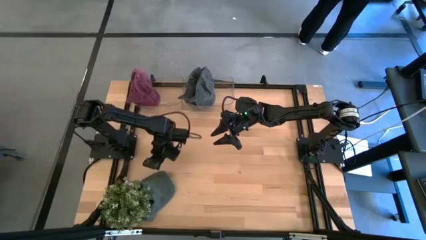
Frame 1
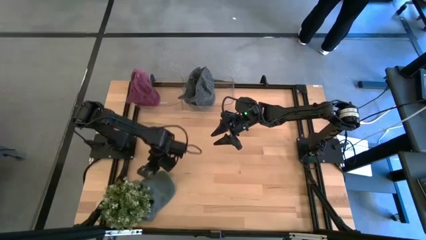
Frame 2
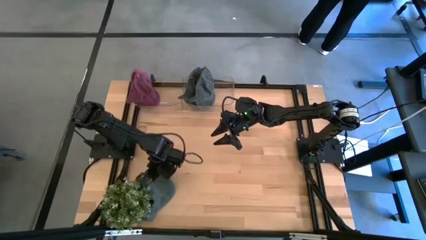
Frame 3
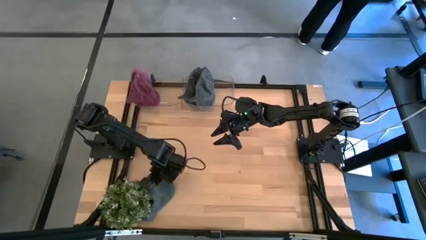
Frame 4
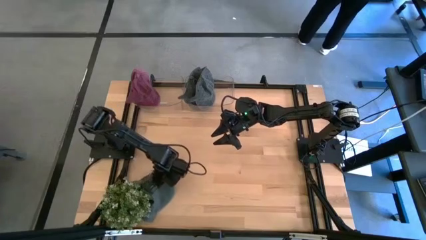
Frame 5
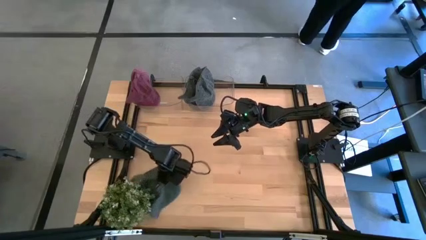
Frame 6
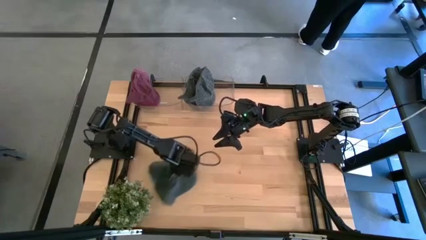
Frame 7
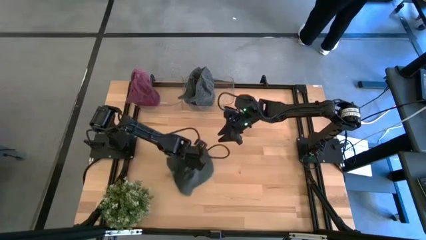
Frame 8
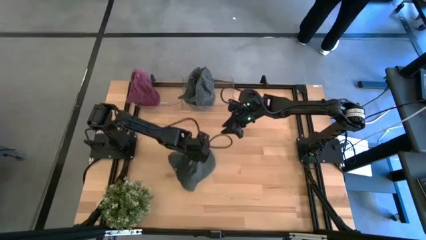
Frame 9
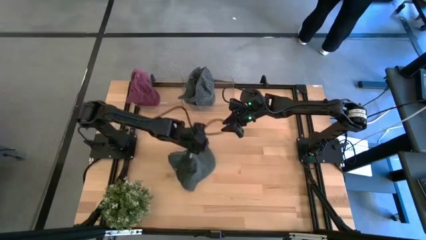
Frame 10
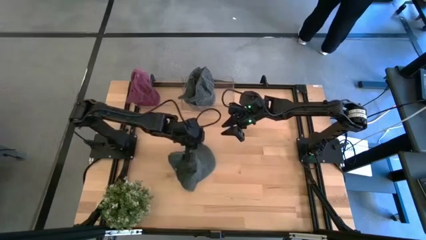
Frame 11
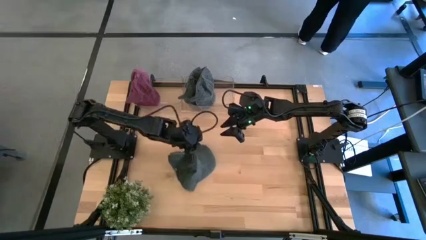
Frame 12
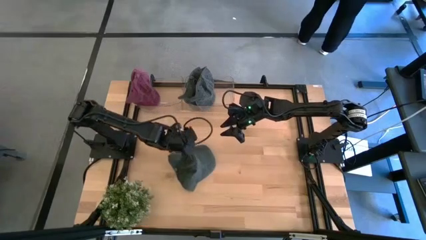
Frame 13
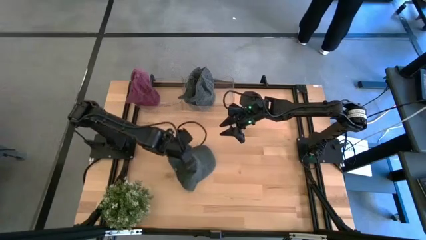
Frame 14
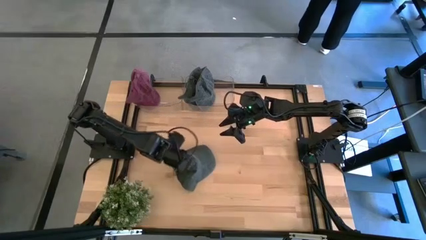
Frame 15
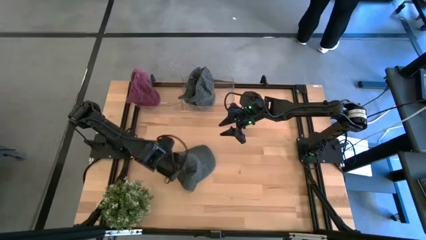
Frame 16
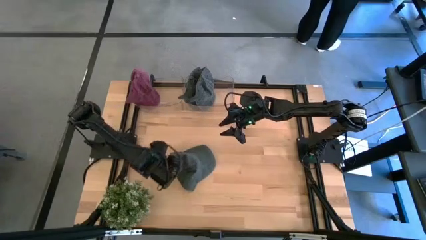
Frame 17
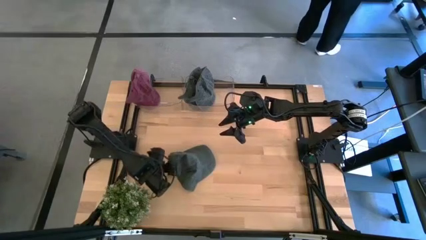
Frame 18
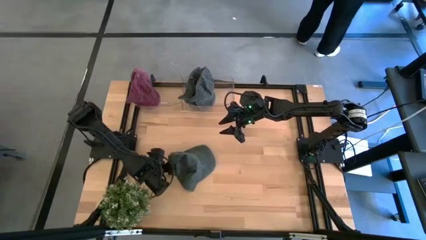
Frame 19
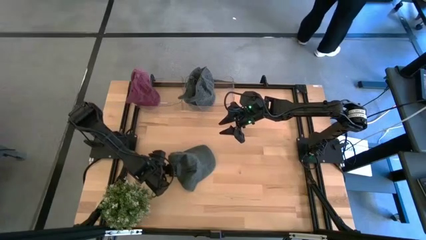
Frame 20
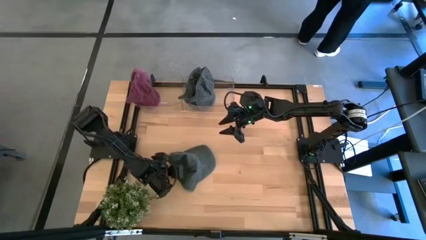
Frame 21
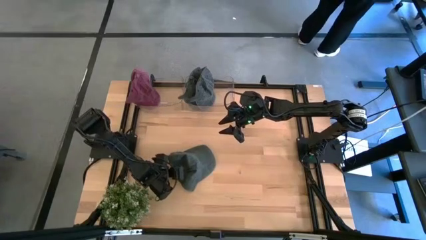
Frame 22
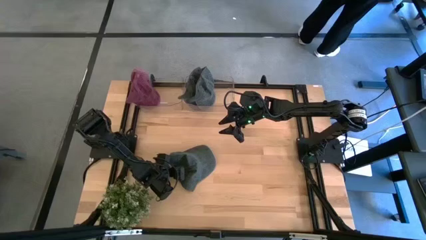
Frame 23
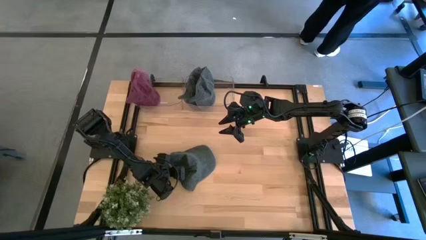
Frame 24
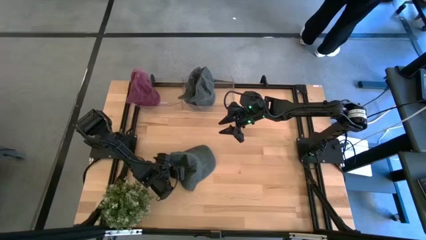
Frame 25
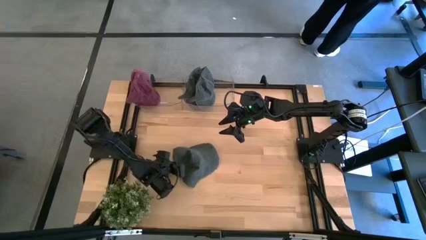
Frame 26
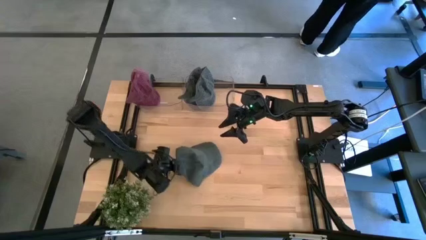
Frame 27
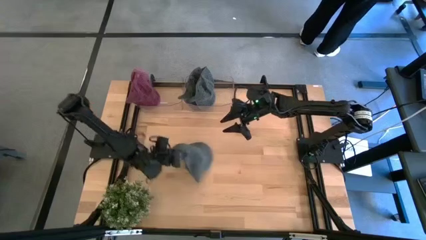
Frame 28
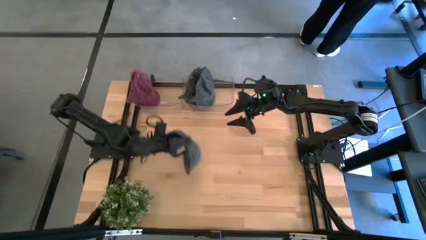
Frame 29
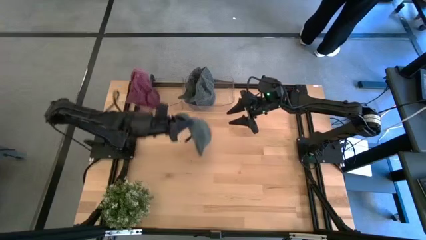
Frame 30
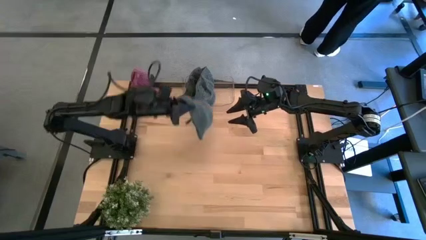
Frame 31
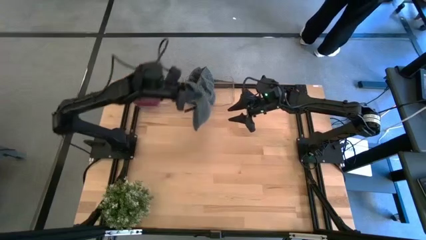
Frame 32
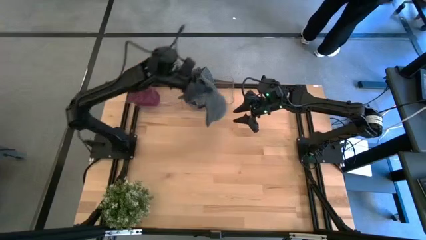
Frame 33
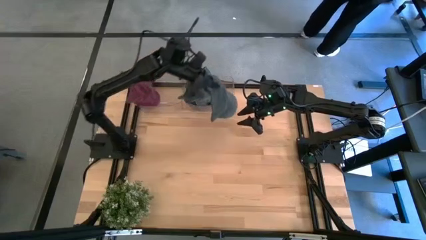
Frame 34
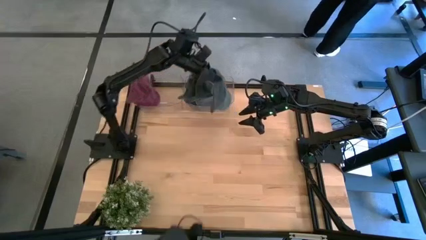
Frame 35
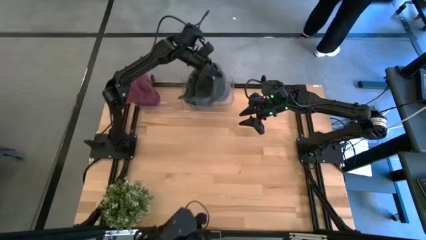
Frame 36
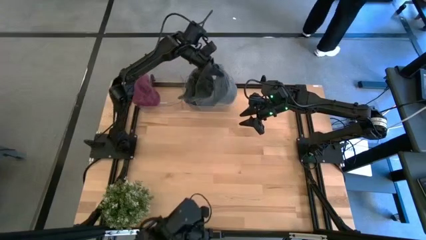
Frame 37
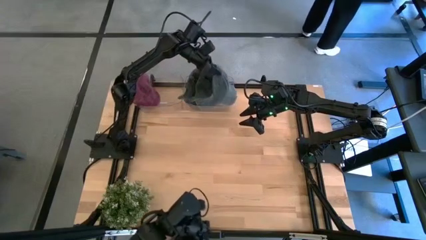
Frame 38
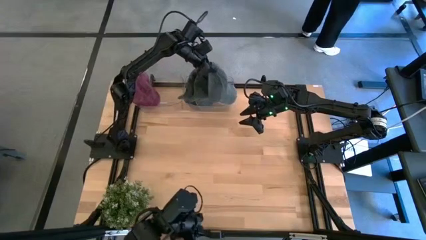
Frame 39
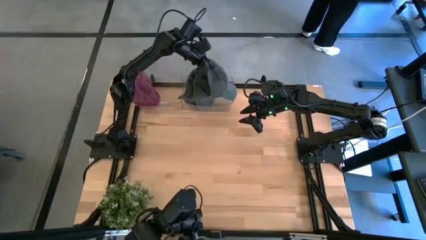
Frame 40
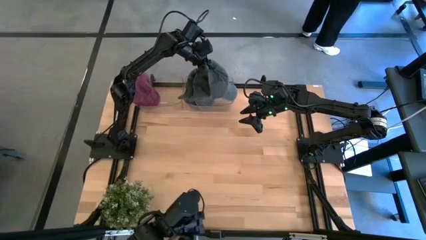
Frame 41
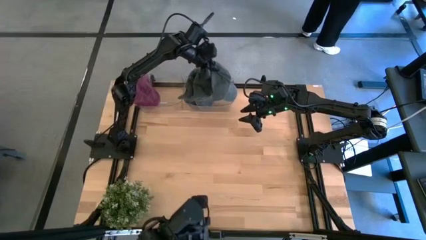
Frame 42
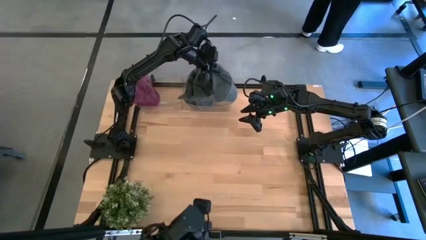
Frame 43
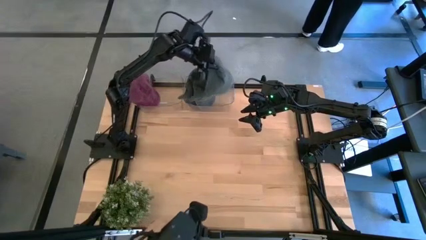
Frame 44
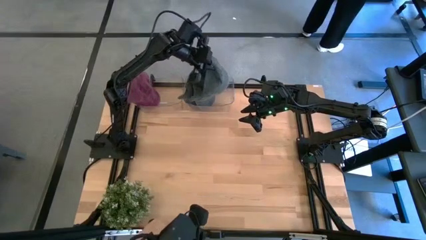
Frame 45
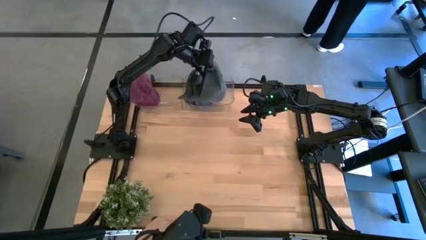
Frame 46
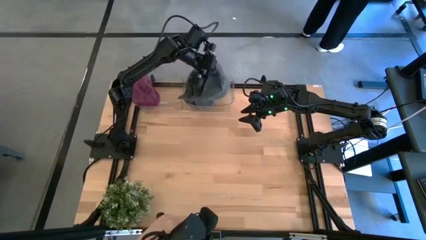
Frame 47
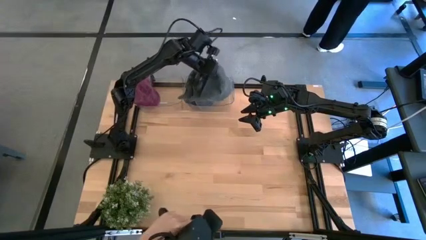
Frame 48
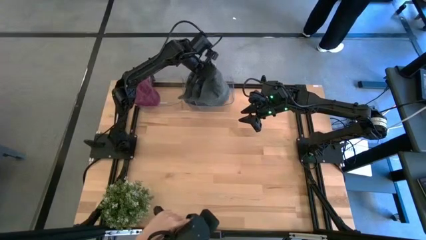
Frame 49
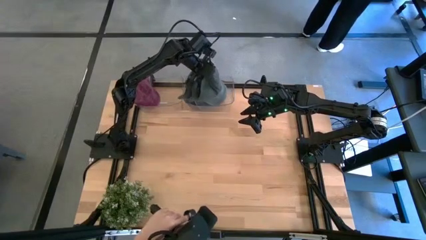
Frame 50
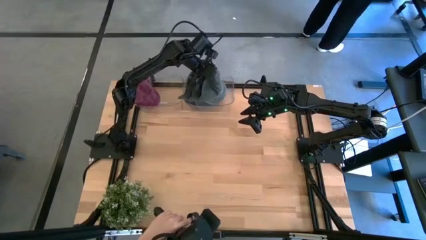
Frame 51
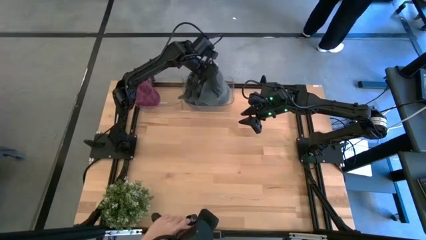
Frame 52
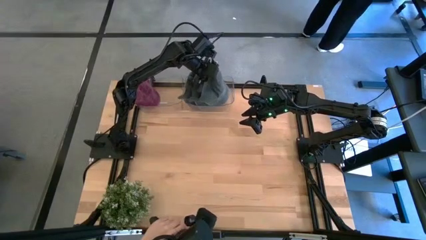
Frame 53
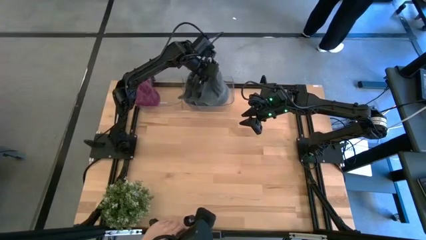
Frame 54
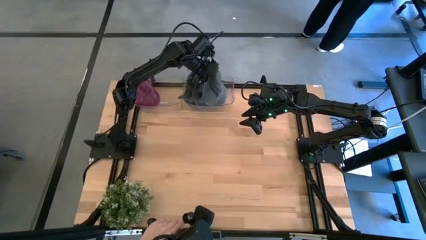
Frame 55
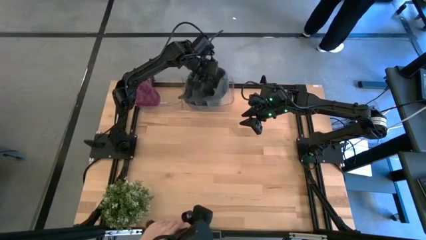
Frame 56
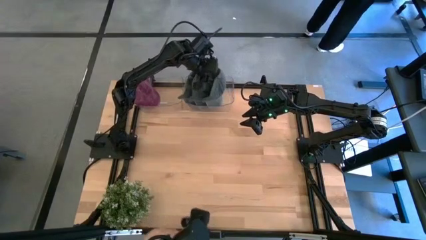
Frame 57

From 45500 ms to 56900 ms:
Task: Pick and place caps into container
Put the blue cap into the right transparent container

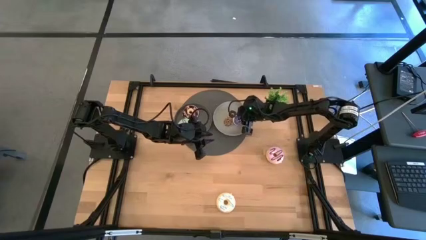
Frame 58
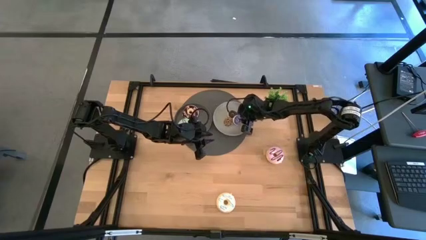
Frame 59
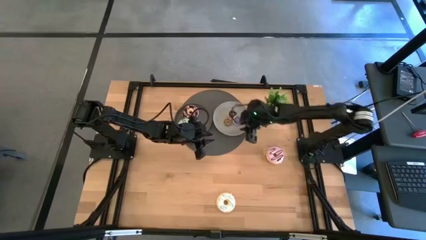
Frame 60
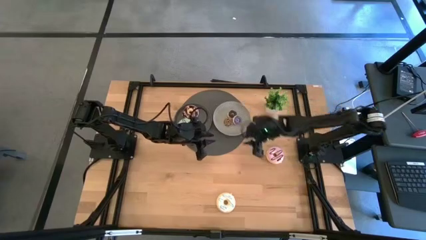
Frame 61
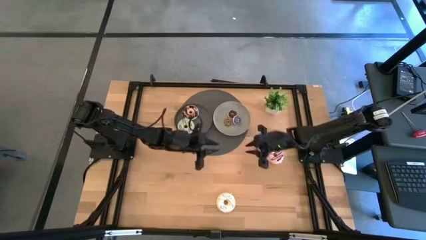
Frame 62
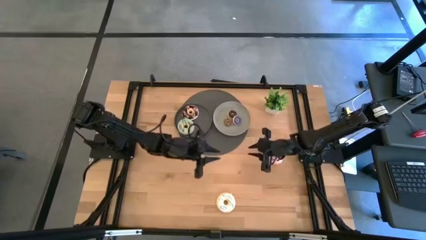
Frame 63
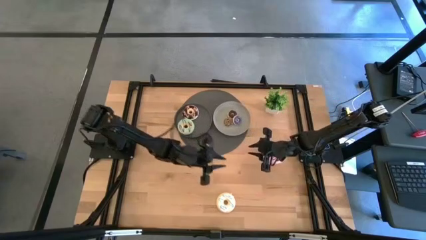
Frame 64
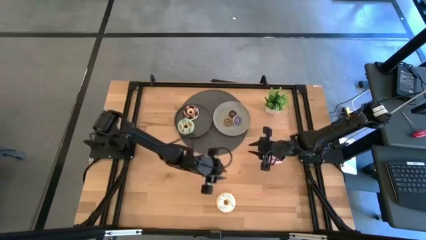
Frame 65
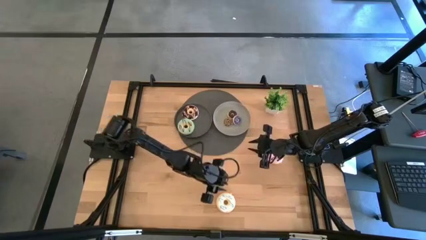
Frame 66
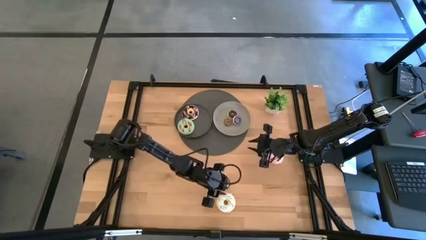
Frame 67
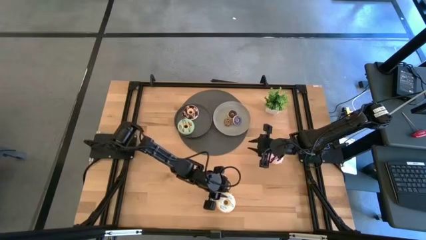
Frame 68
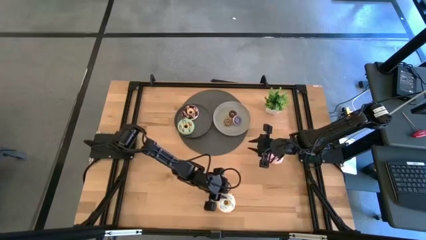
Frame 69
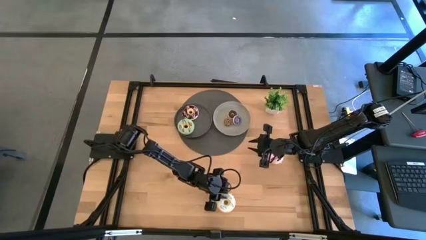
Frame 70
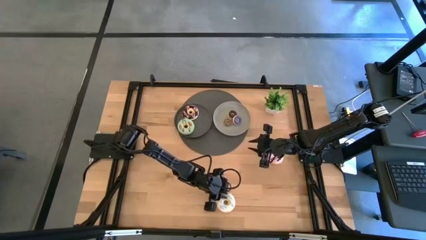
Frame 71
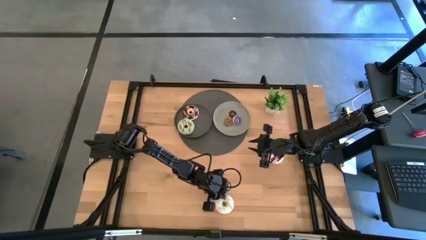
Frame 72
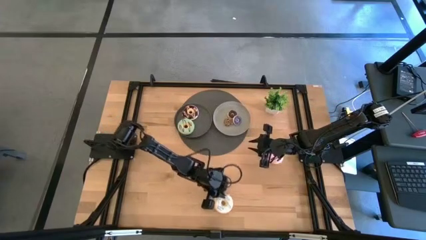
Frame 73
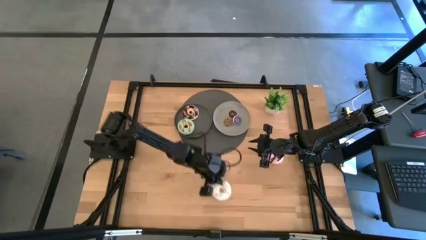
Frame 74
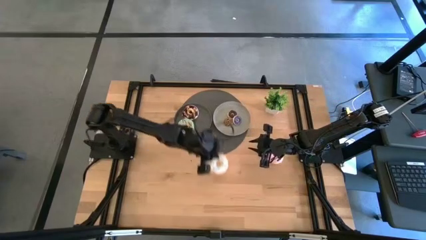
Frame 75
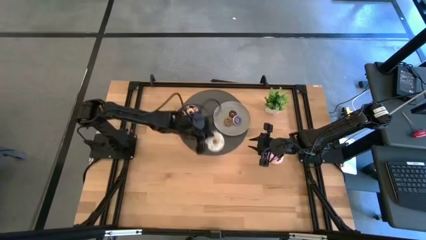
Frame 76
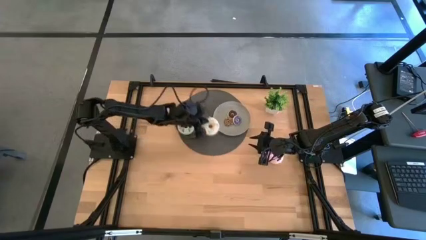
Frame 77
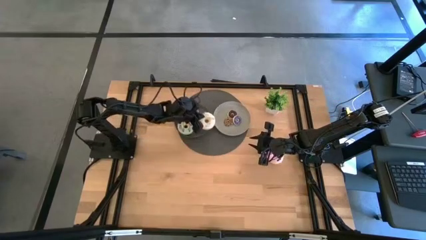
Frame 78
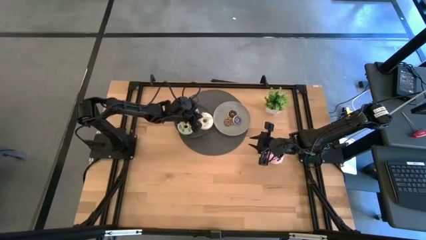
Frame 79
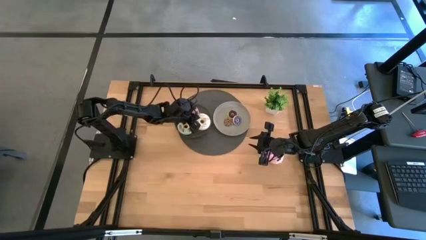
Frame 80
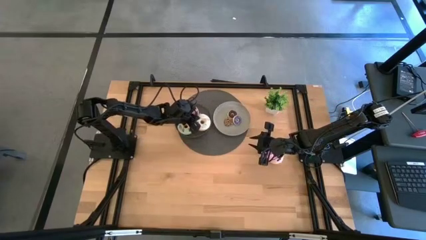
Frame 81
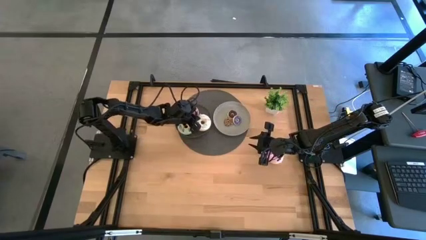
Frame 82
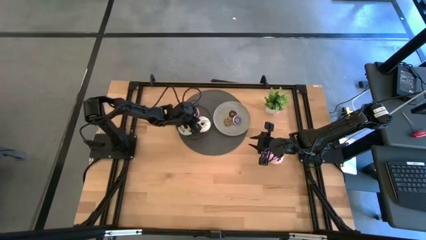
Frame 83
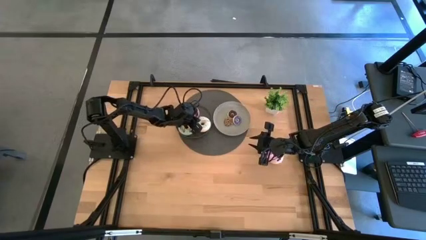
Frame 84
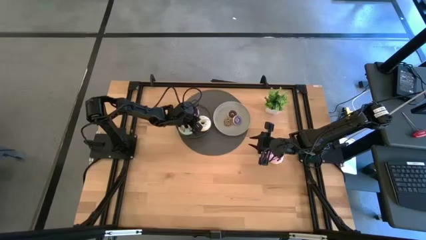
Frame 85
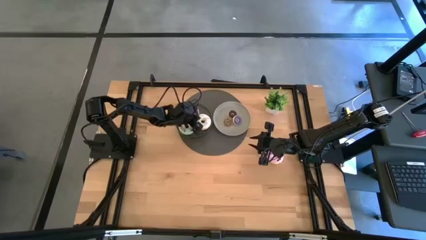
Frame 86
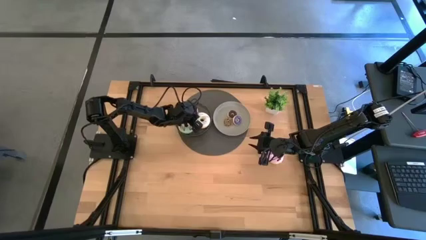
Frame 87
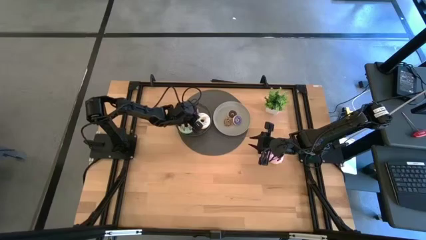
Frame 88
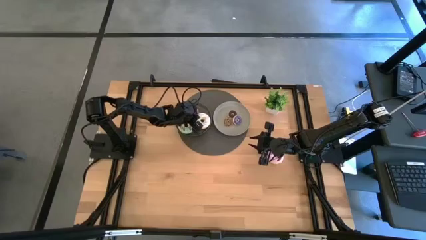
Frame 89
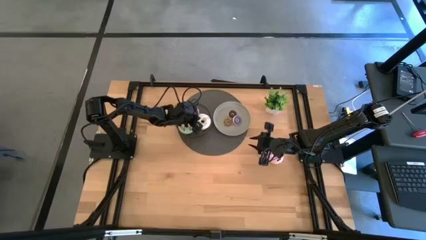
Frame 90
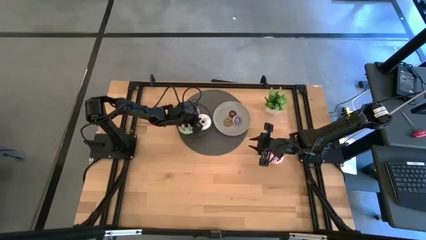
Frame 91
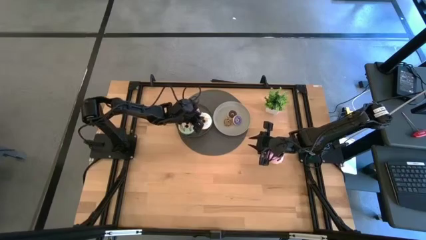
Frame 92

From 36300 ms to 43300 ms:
Task: Pick & Place donuts
Put the big white doughnut on the dark gray plate
